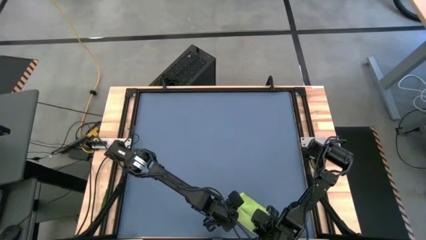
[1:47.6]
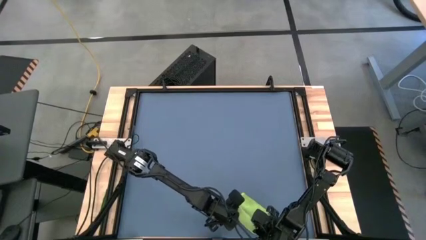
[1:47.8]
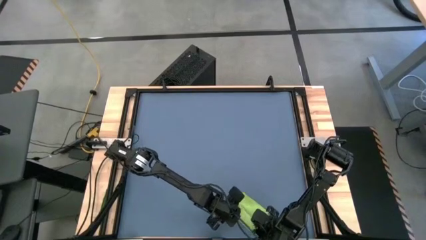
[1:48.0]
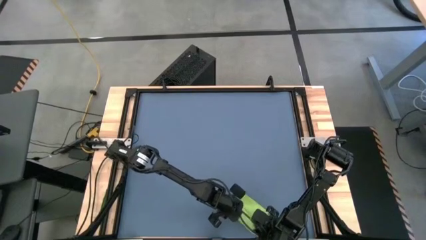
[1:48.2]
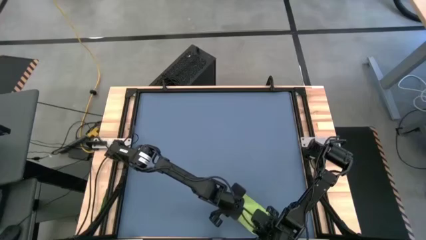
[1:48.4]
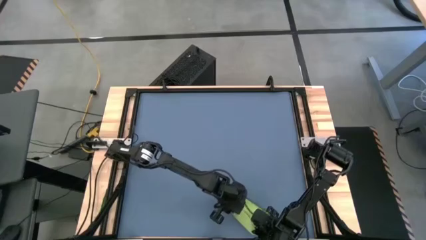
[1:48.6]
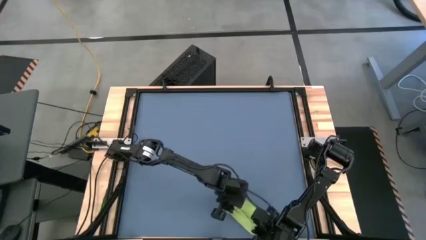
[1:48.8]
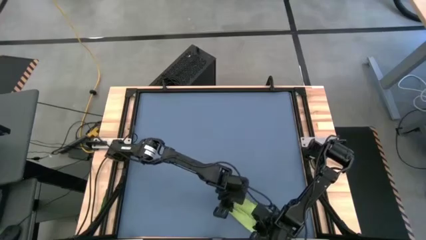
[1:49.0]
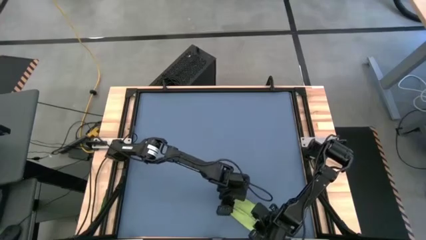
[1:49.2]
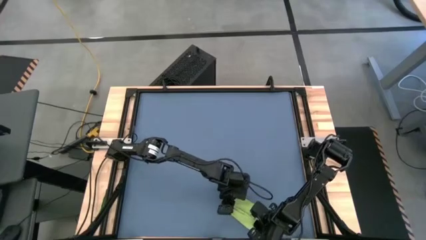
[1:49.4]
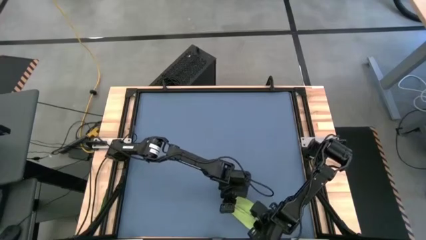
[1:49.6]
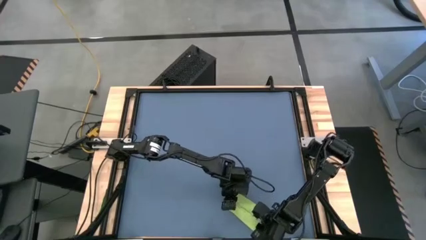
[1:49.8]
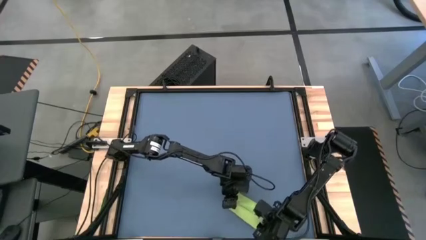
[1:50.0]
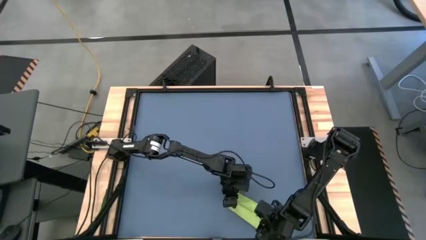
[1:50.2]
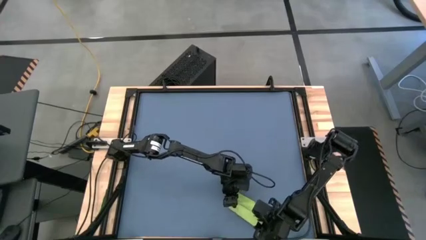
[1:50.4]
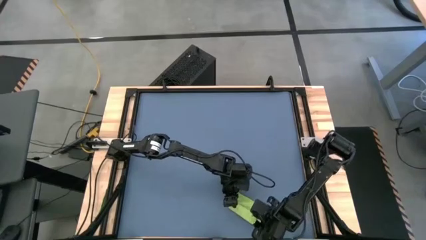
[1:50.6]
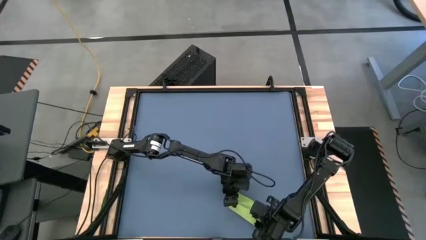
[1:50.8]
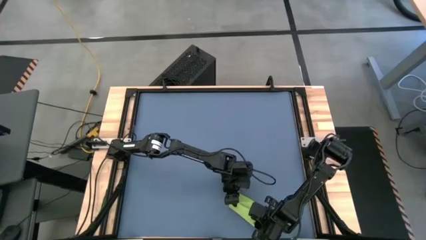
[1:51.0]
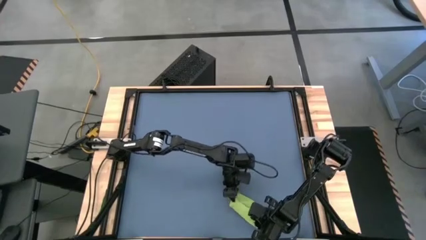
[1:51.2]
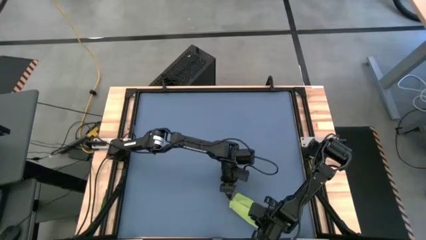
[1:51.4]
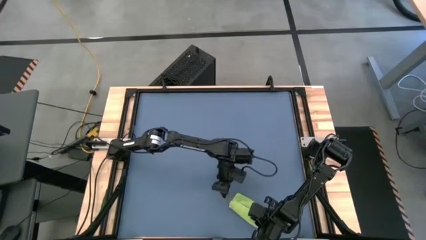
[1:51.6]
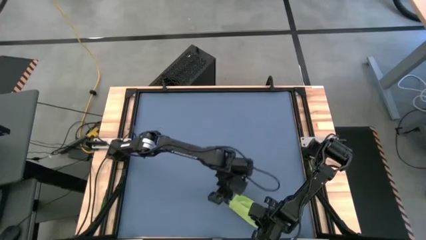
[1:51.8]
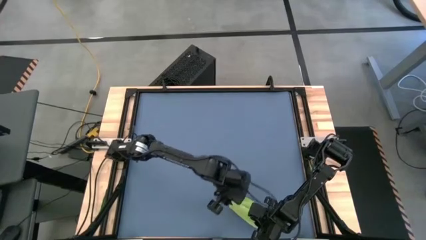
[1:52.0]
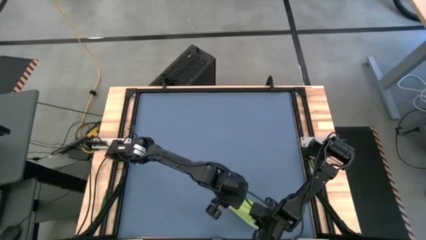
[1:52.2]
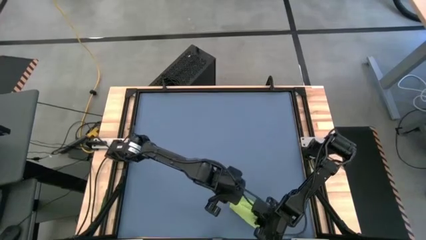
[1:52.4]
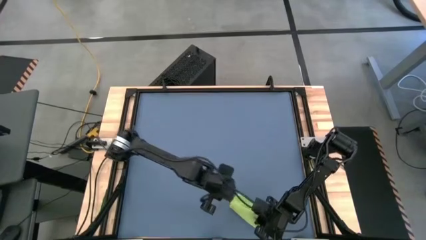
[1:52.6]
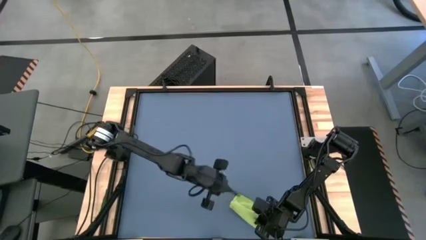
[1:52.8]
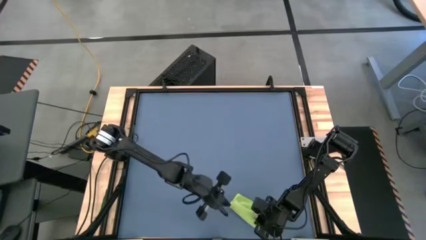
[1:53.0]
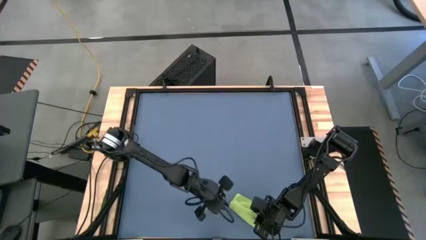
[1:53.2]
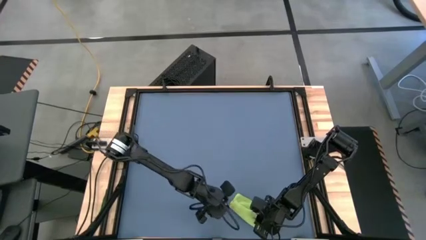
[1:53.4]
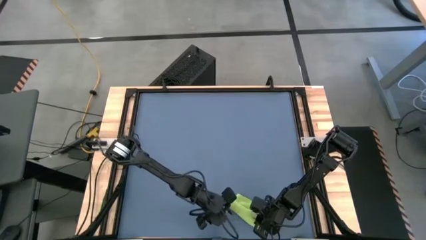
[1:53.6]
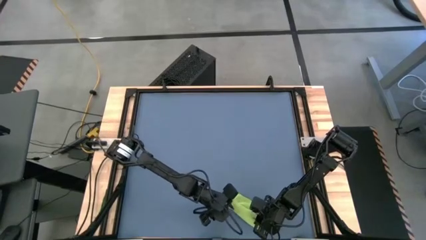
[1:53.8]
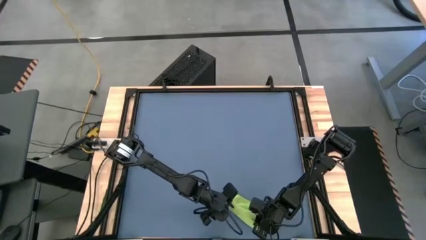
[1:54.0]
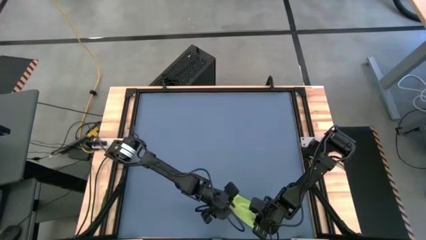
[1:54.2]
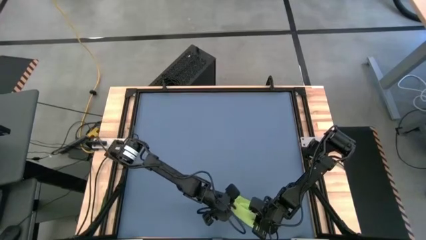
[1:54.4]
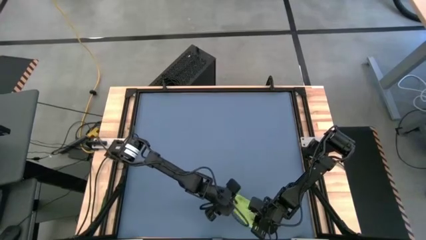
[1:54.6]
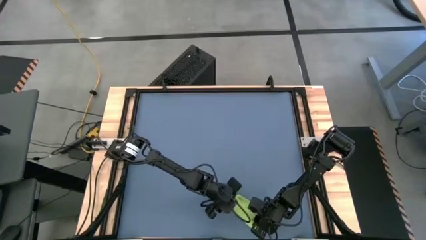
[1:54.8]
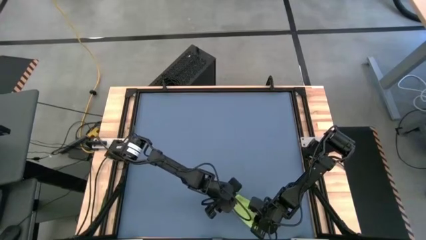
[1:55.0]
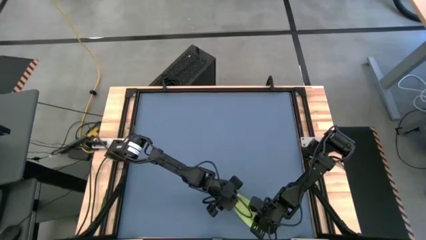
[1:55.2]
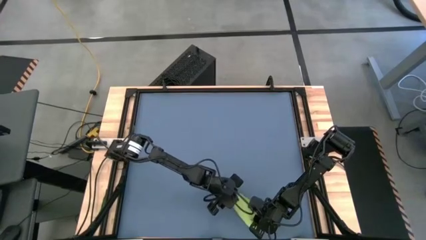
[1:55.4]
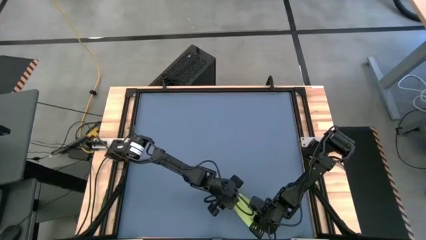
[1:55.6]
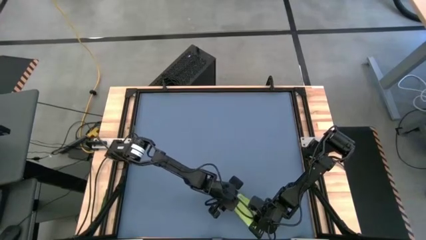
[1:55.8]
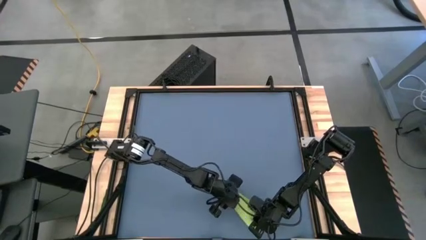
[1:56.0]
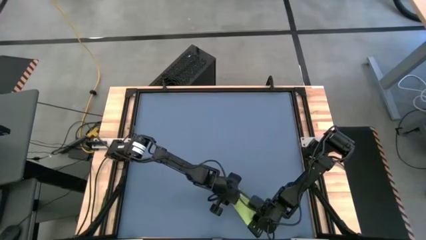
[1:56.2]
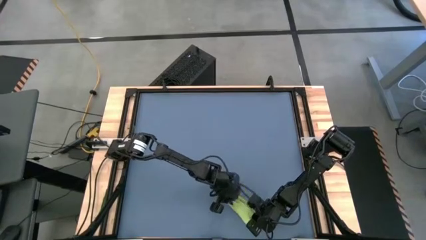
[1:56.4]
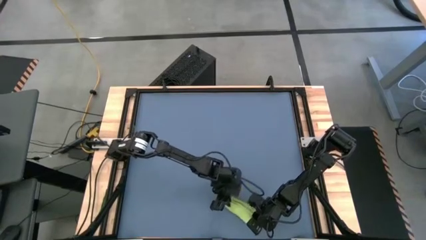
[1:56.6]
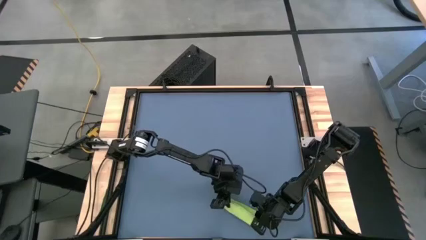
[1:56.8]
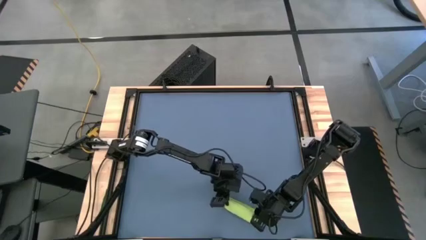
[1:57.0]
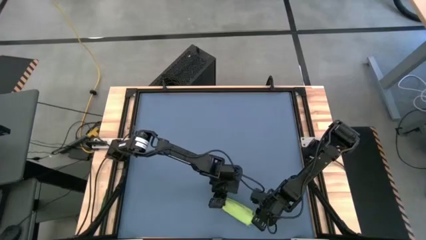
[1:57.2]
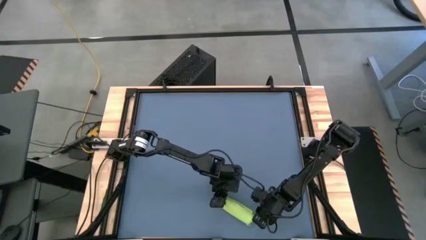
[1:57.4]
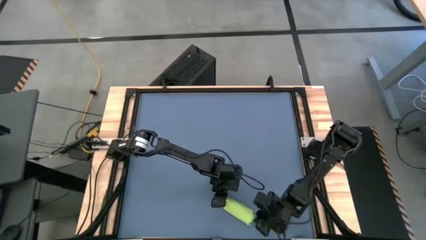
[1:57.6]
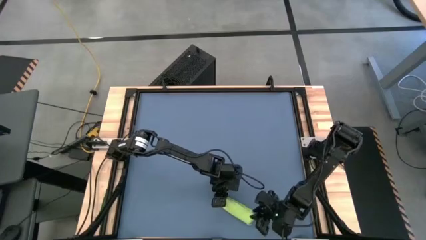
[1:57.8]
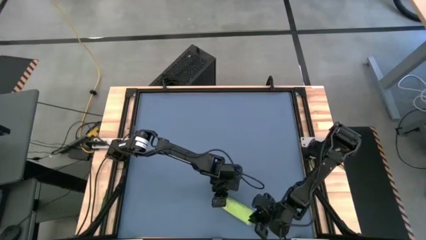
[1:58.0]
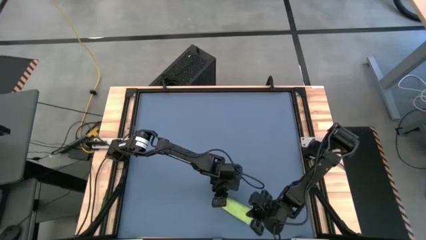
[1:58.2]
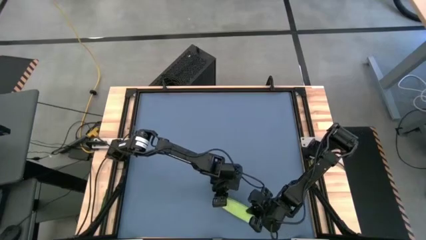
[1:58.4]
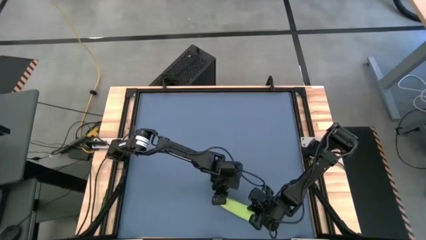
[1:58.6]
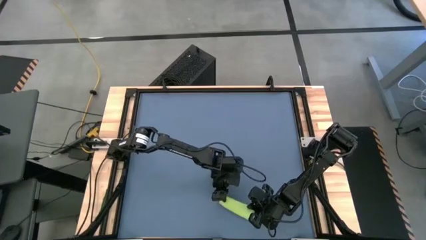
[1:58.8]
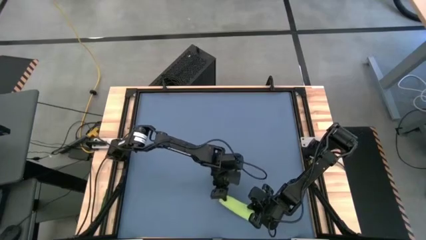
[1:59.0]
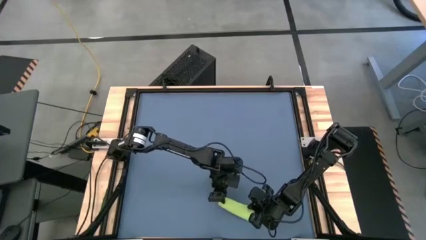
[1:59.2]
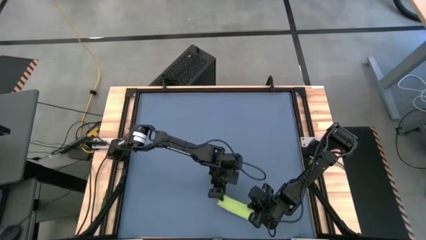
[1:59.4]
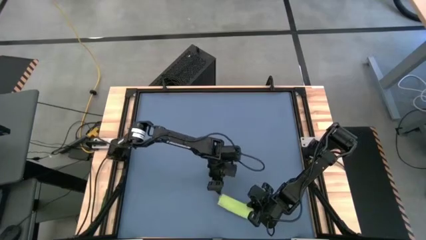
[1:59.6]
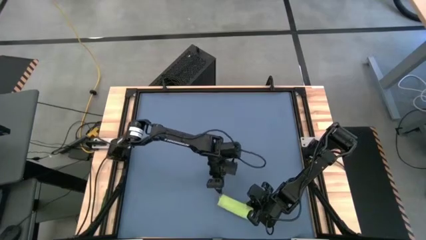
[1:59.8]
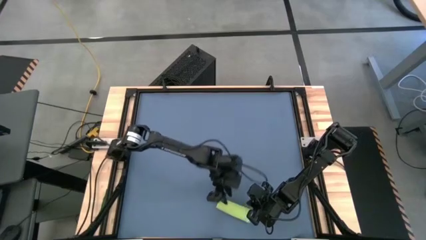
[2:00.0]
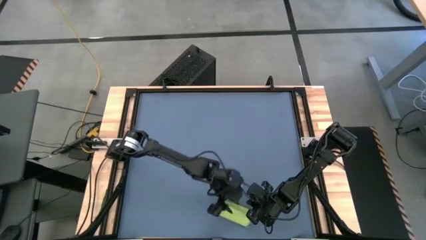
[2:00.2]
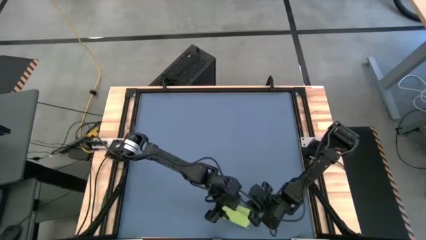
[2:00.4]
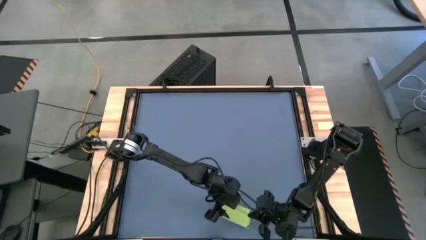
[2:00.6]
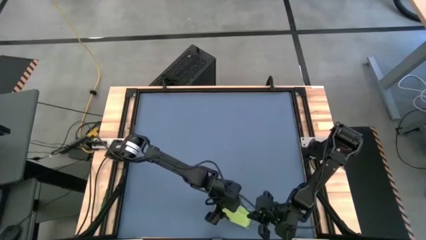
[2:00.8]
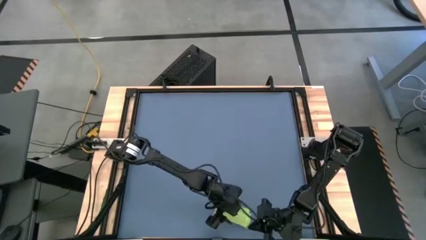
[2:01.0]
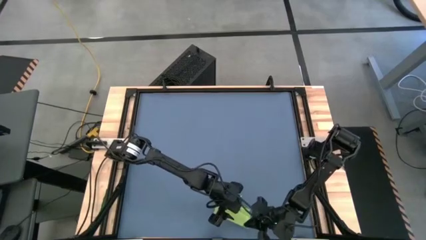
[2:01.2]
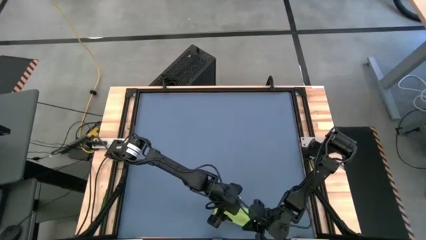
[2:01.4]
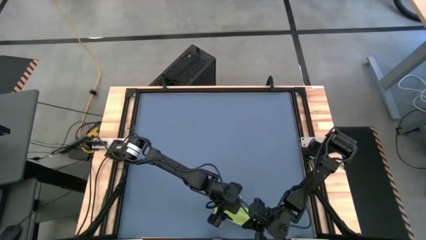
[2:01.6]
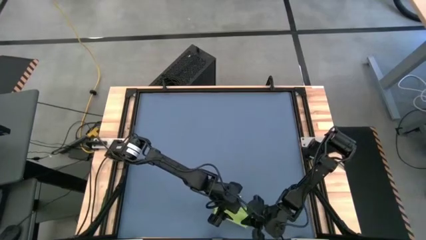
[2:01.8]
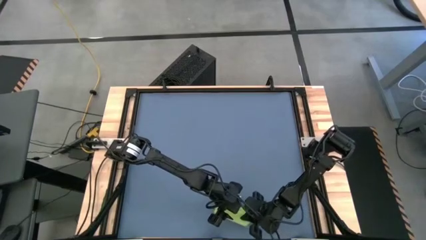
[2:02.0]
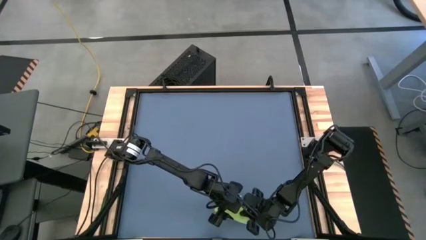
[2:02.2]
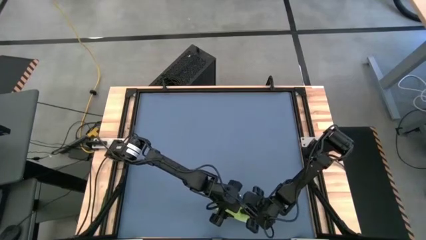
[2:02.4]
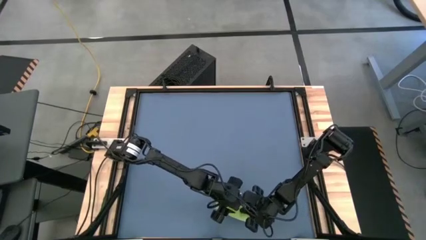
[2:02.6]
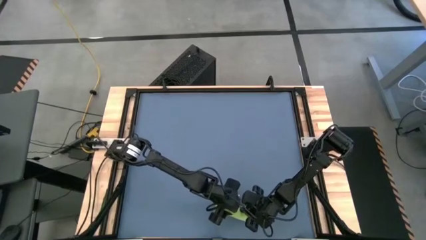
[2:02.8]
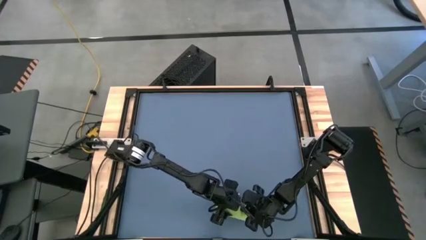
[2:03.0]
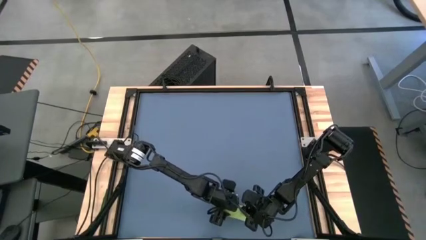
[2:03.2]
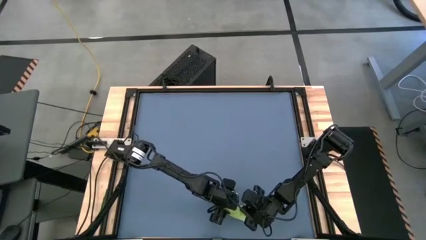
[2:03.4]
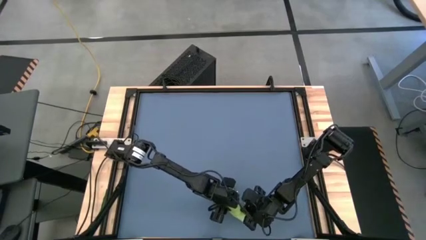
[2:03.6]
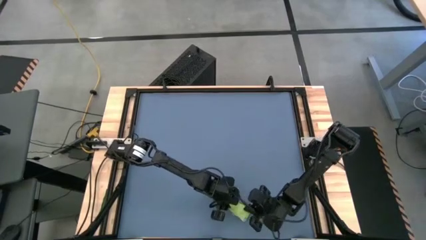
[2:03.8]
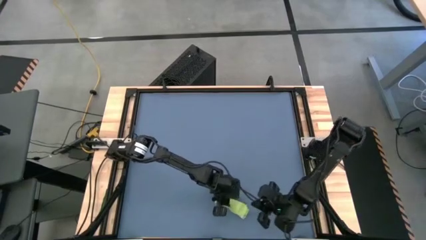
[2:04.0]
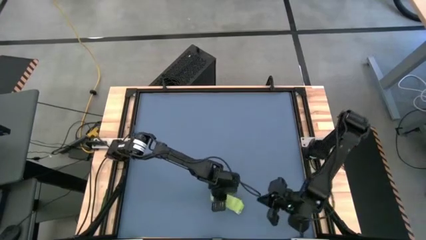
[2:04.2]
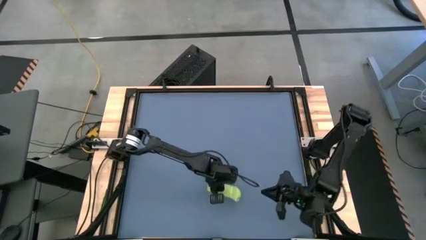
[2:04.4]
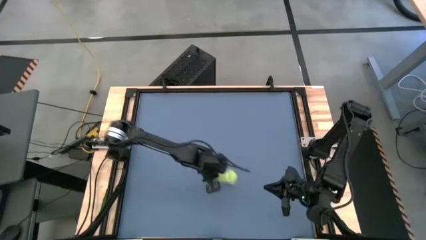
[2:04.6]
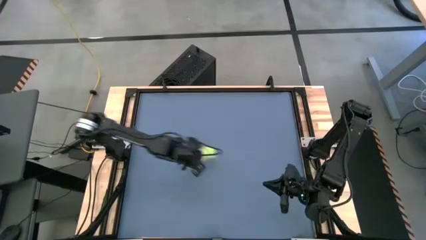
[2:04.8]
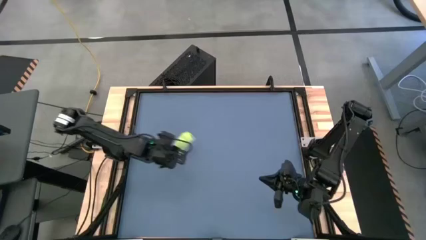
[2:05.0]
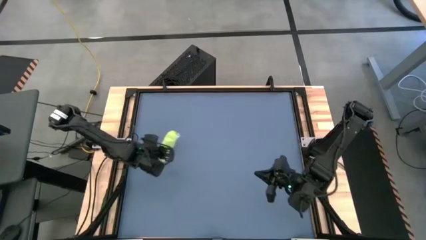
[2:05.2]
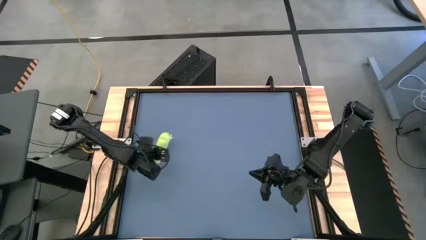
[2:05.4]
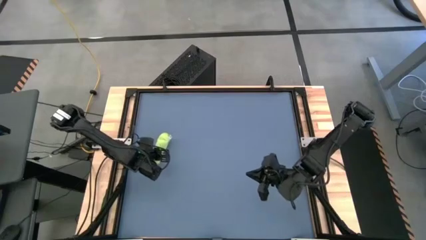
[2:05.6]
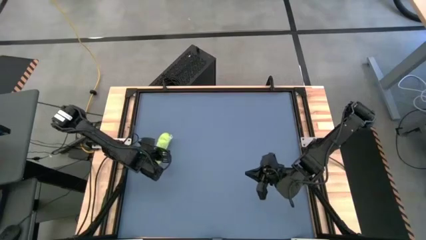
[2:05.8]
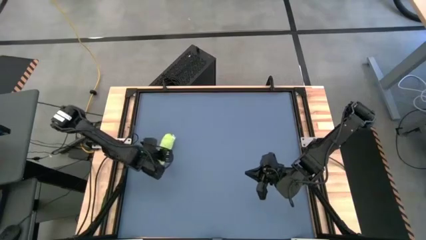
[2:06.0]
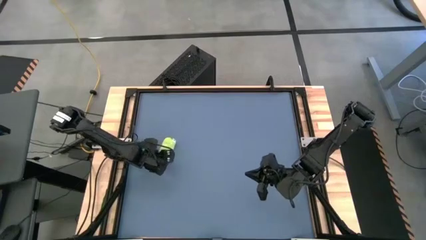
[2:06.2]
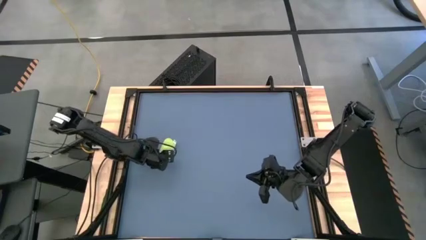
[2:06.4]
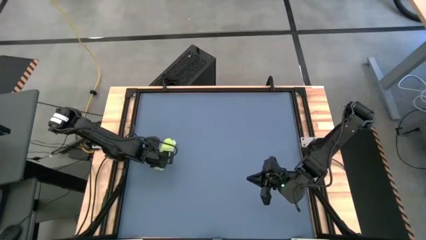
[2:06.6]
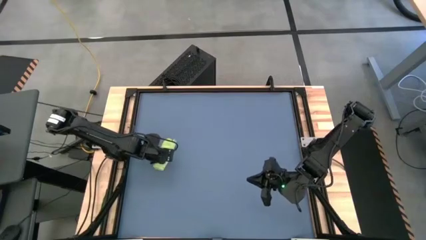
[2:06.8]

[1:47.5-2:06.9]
Task: Roll towel
Roll the green towel
